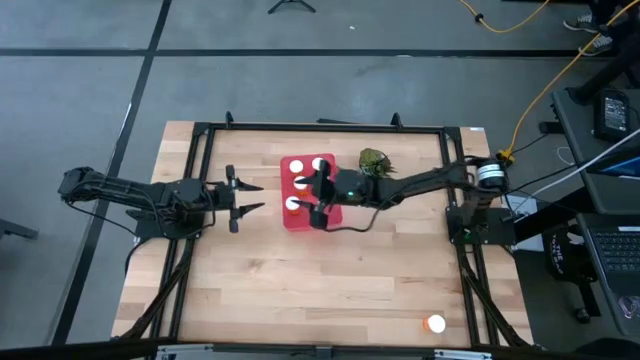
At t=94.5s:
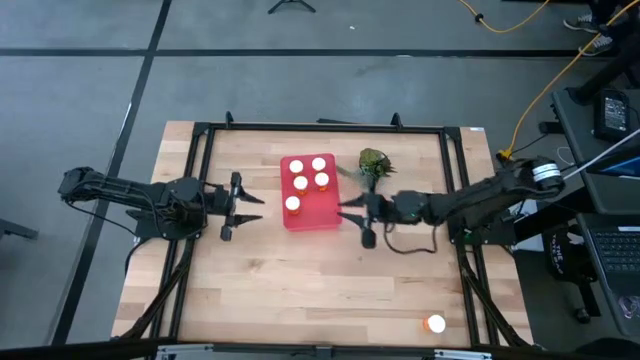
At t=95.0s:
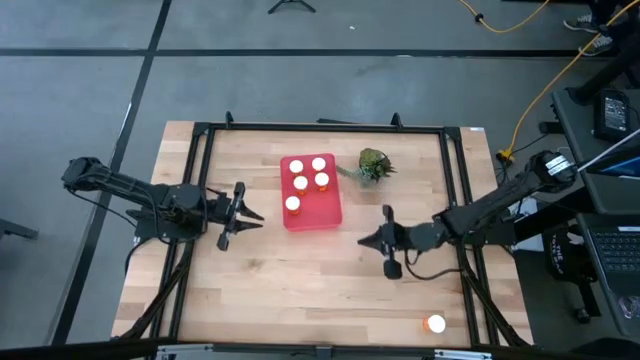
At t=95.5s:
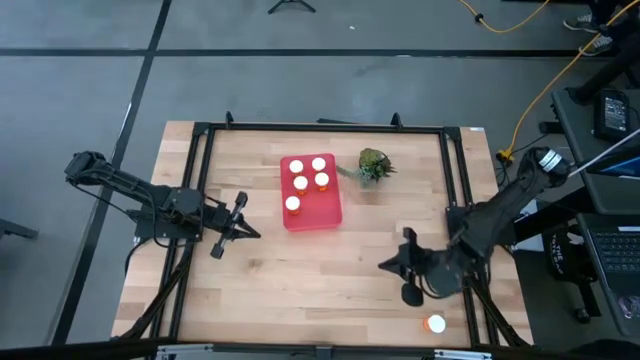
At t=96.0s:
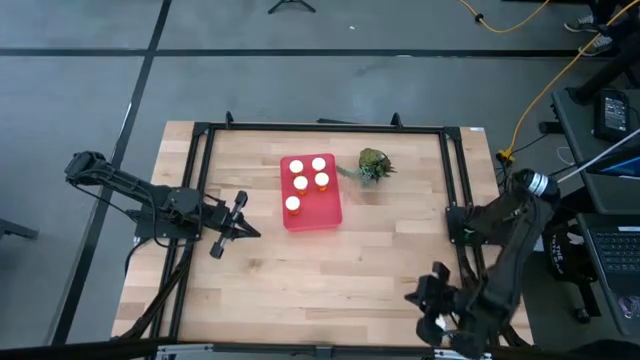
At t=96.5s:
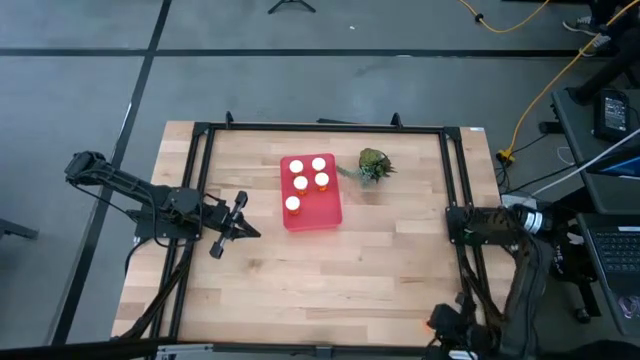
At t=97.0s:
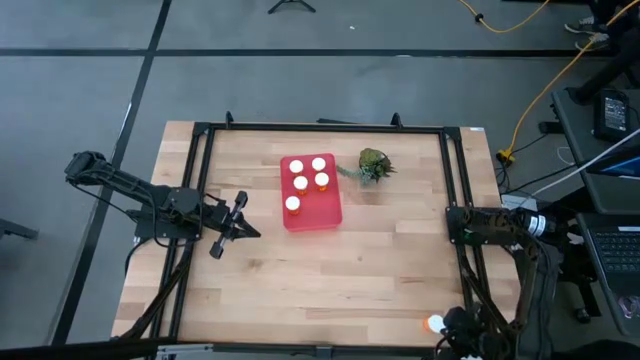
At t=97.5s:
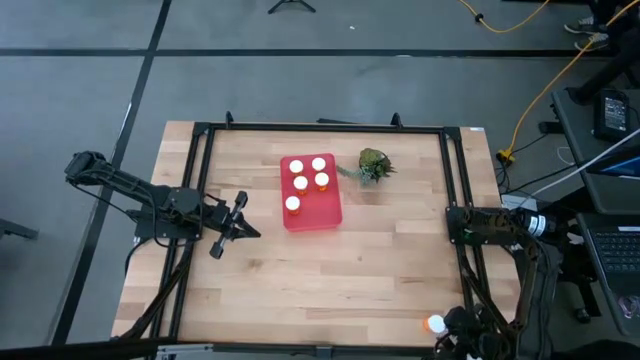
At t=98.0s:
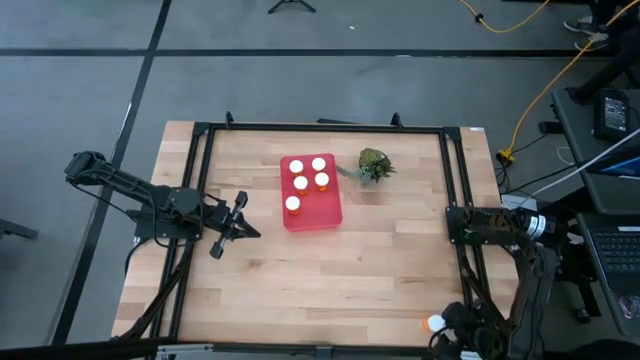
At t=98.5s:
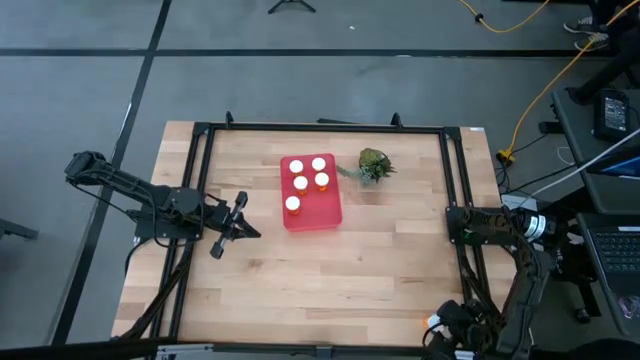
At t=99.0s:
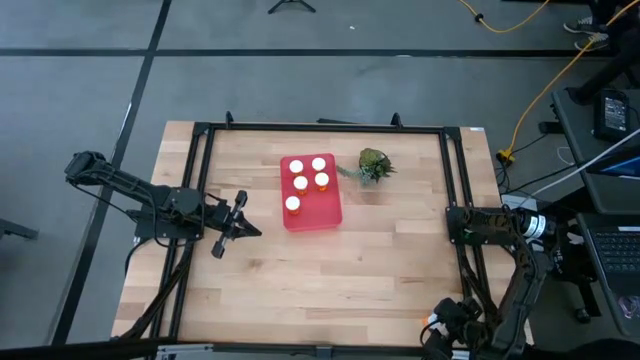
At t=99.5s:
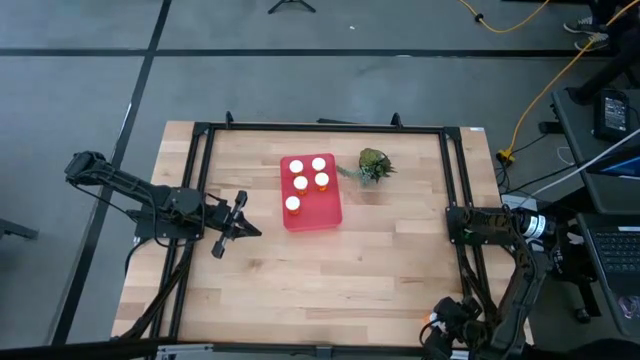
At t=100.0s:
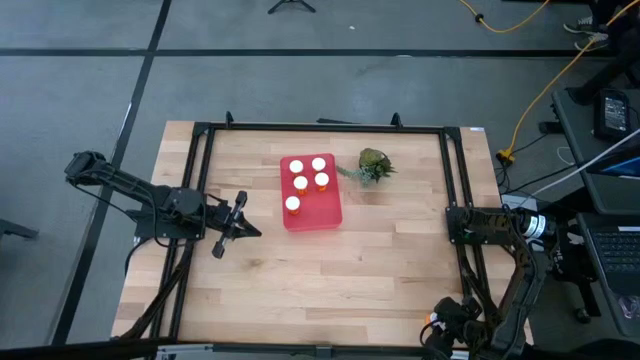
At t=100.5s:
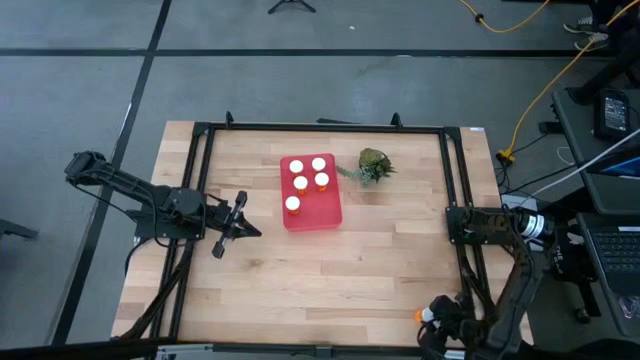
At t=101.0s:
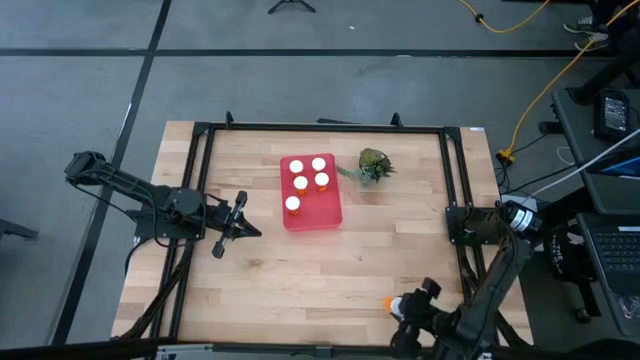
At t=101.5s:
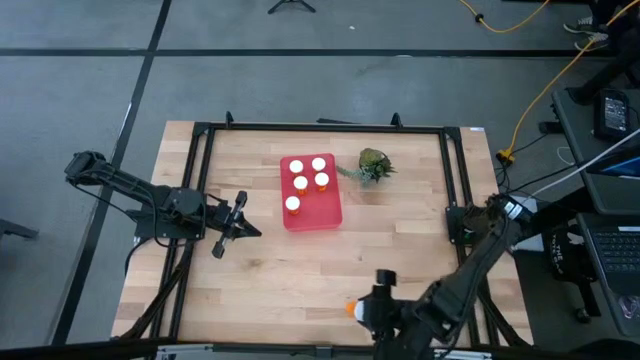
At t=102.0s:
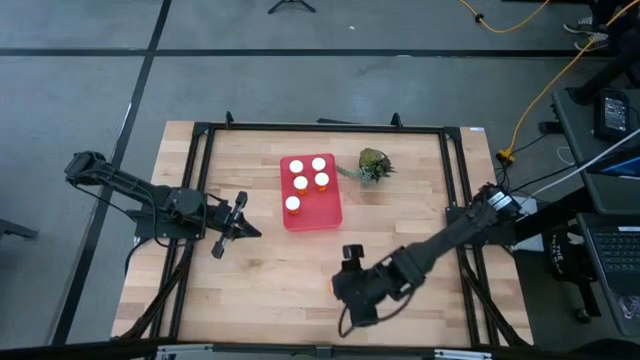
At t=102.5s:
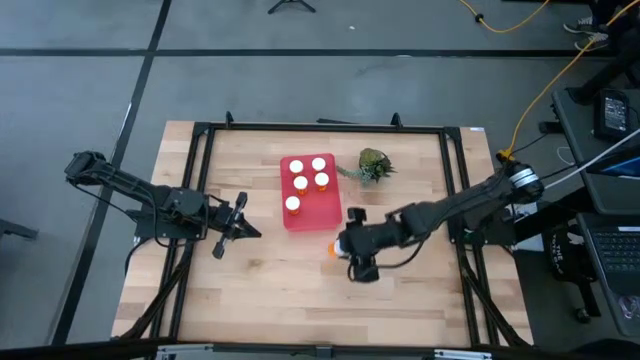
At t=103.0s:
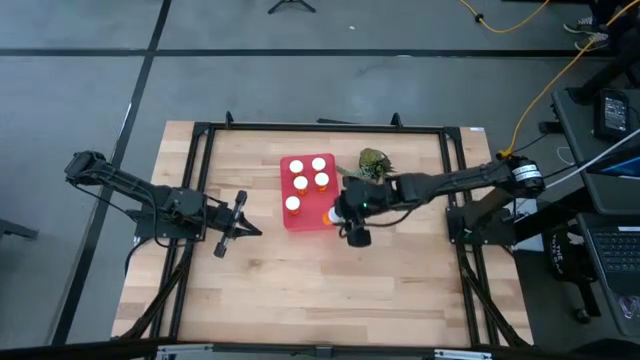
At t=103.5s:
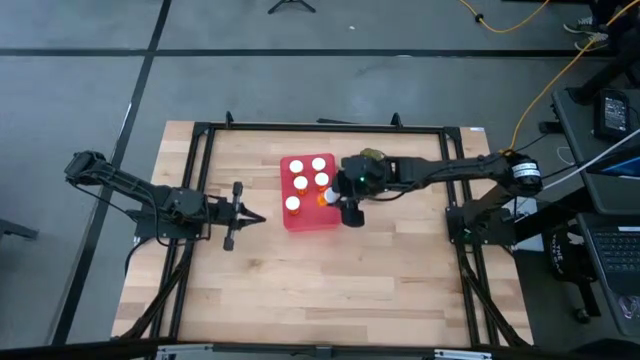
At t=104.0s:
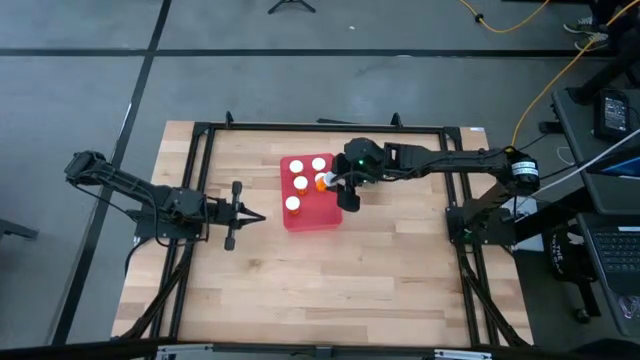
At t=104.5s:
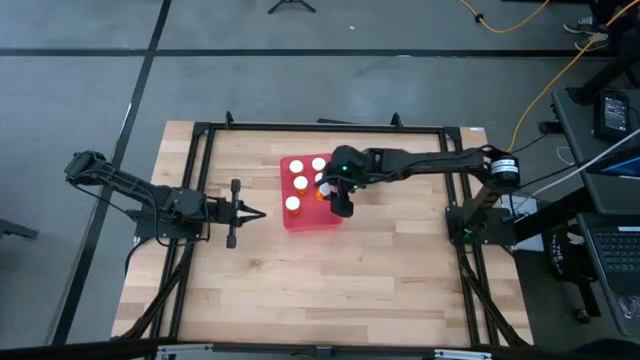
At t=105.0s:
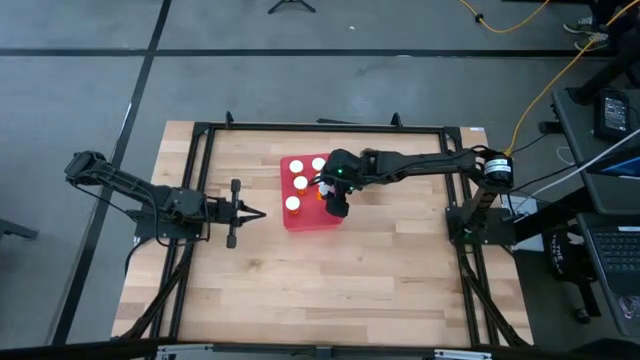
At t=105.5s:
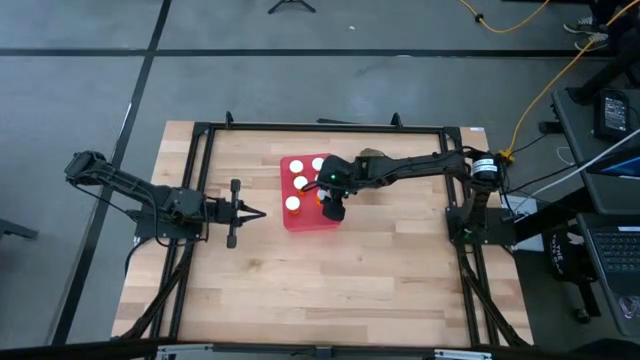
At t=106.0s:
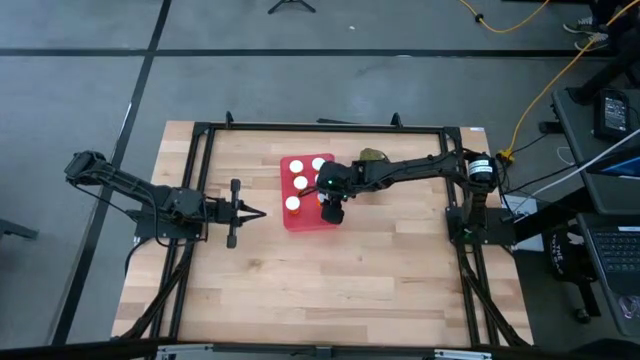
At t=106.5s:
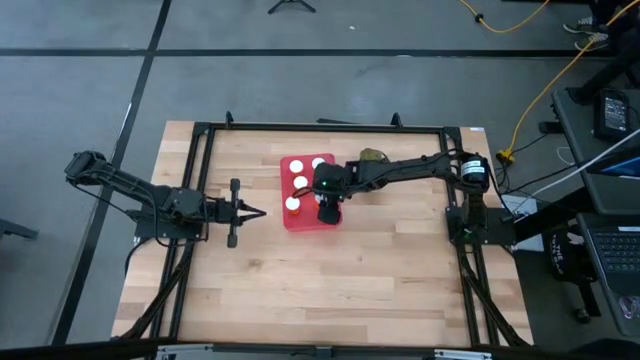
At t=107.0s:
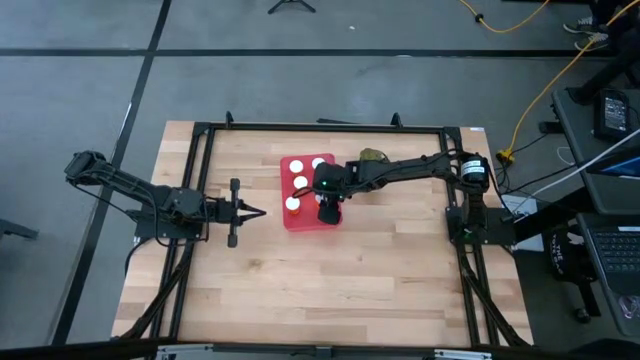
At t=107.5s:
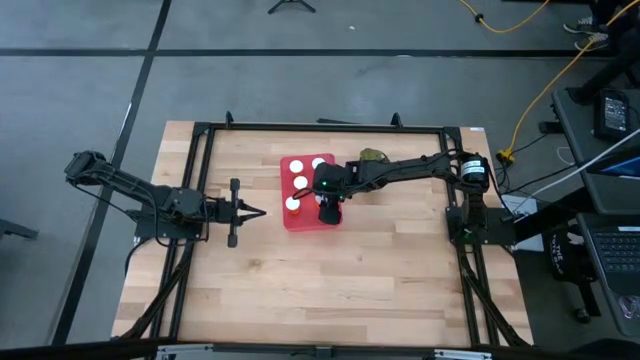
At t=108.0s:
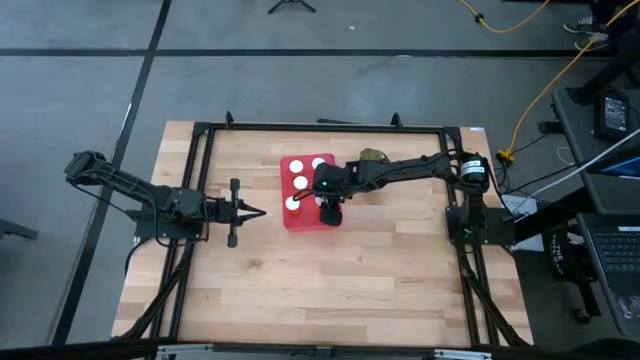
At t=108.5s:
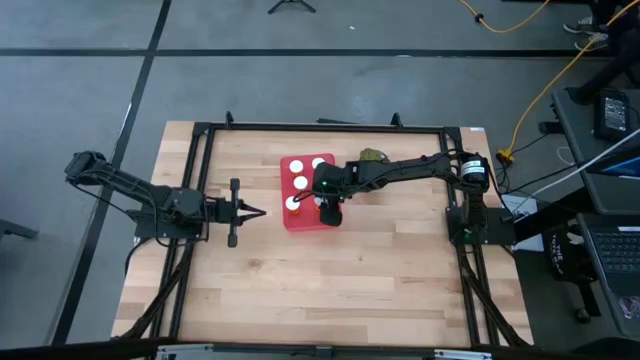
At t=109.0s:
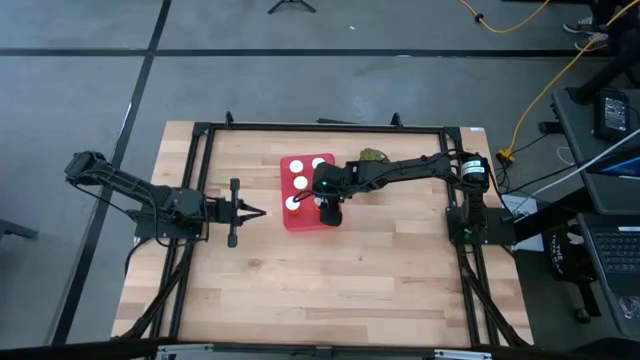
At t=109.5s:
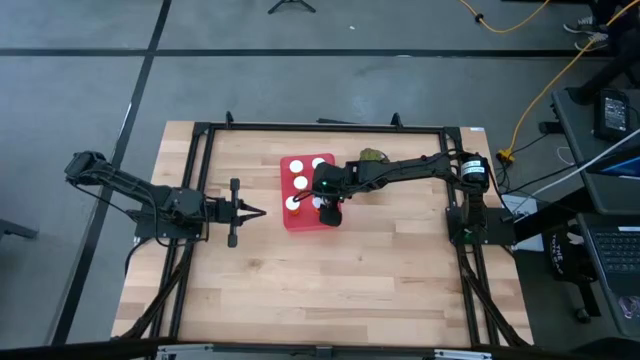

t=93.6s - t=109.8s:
Task: Pick and place pill bottles into a basket
Put the orange pill bottle into the red bin

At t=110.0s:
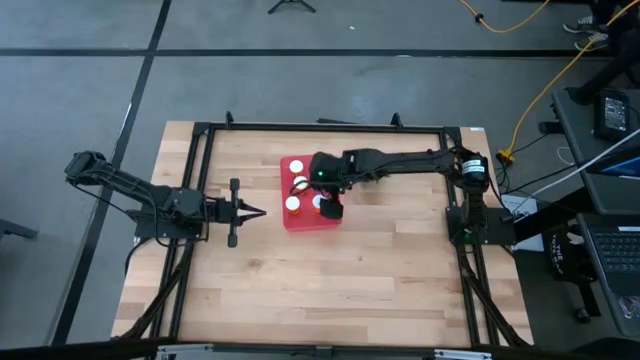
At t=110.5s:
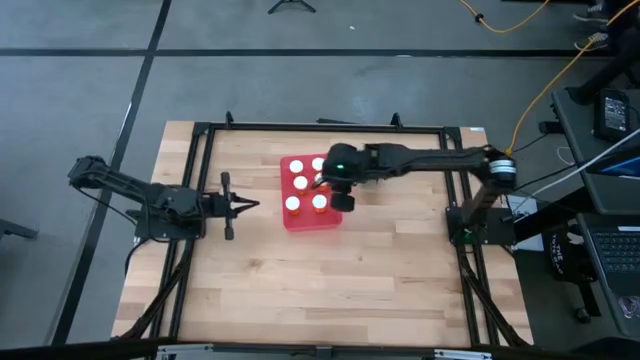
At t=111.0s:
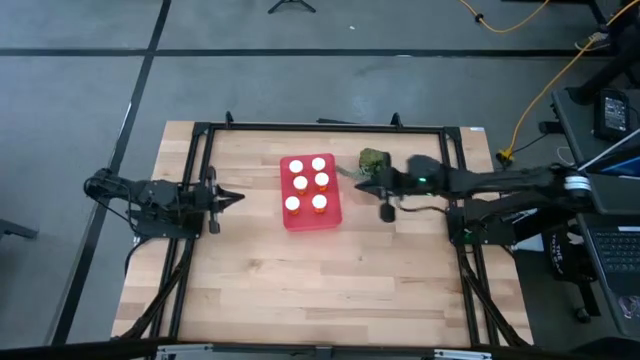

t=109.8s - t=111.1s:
Return to Home Position

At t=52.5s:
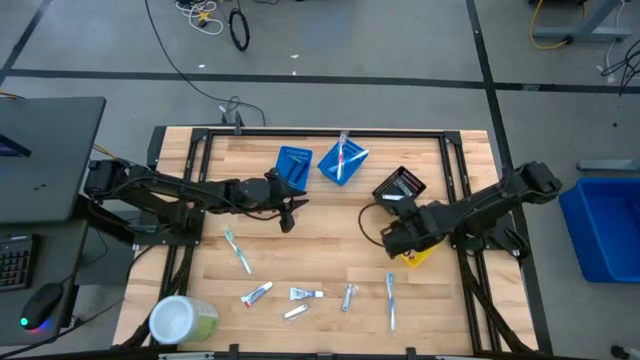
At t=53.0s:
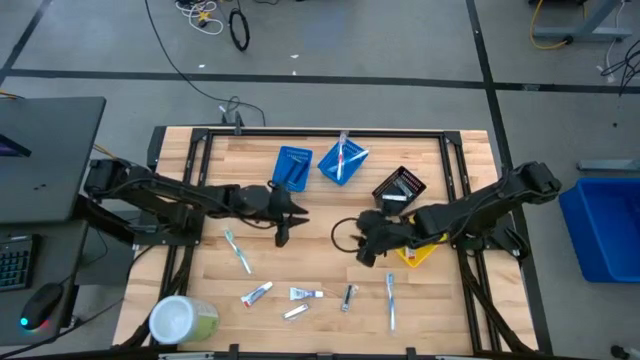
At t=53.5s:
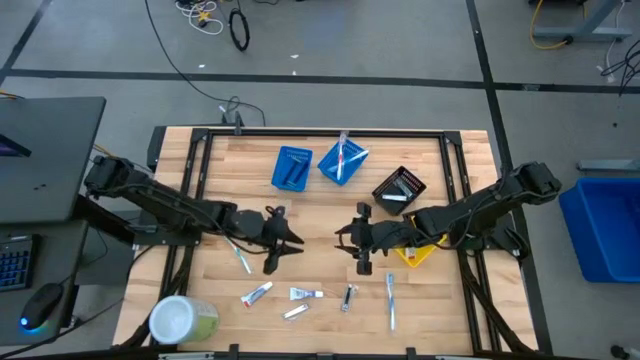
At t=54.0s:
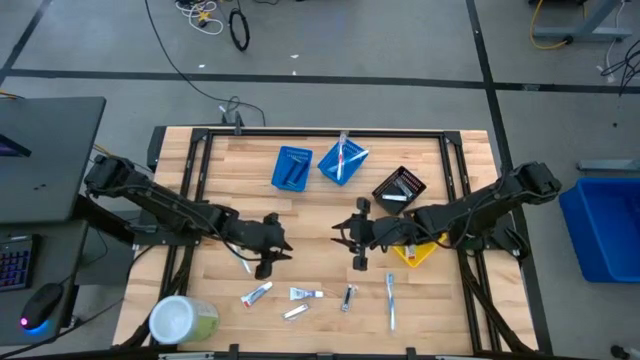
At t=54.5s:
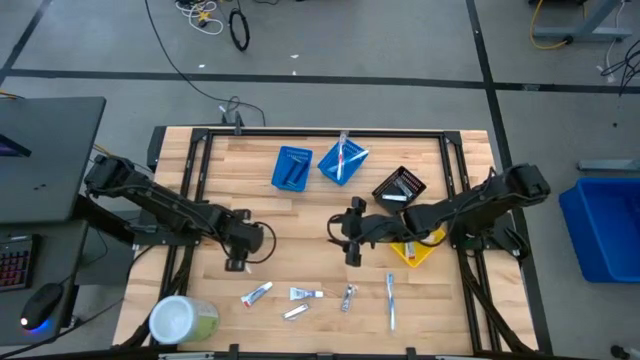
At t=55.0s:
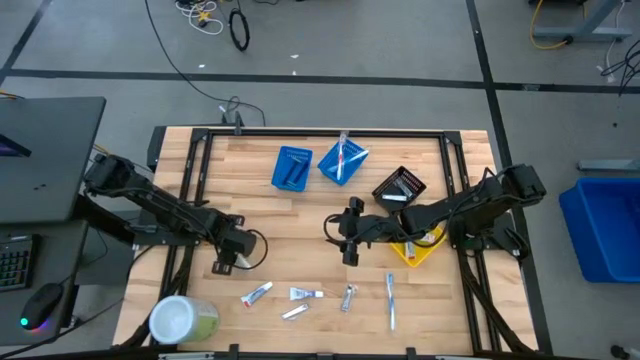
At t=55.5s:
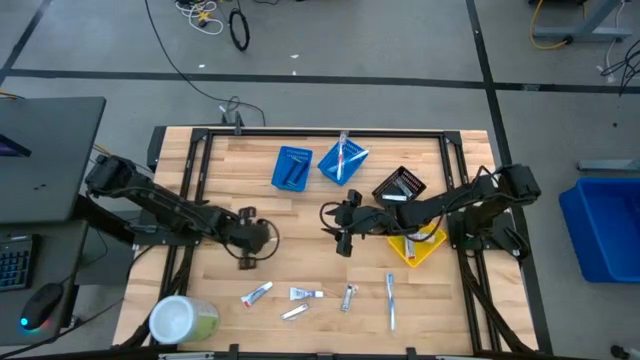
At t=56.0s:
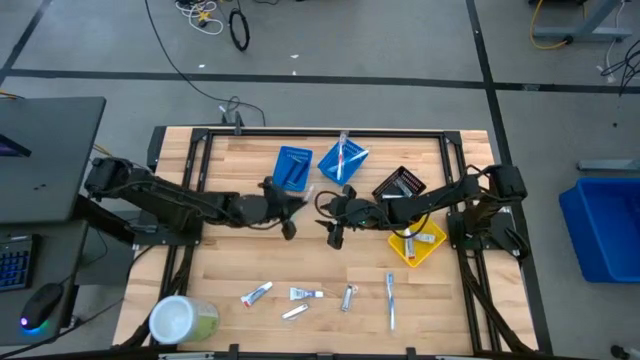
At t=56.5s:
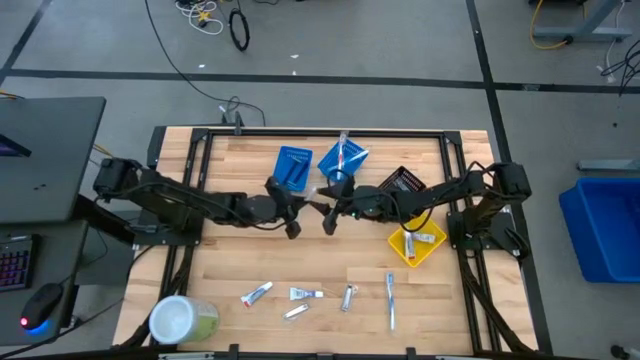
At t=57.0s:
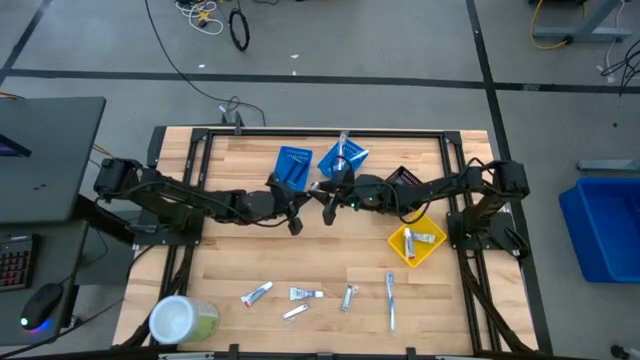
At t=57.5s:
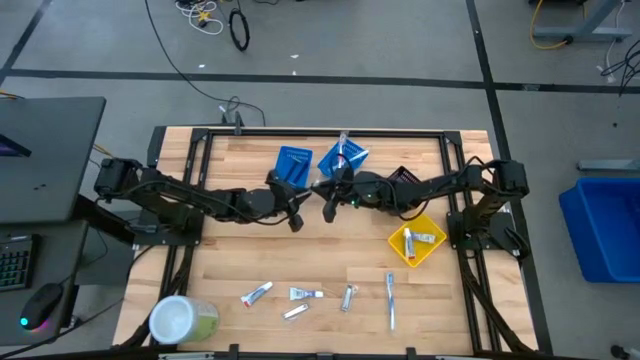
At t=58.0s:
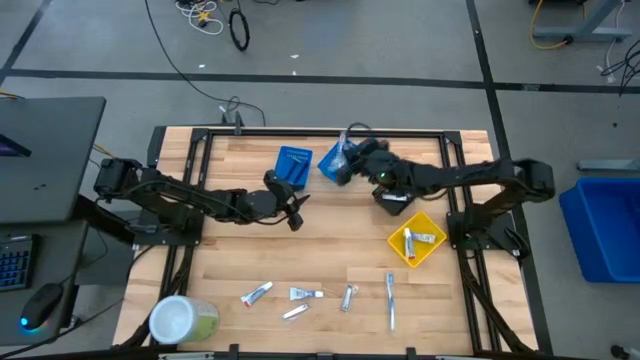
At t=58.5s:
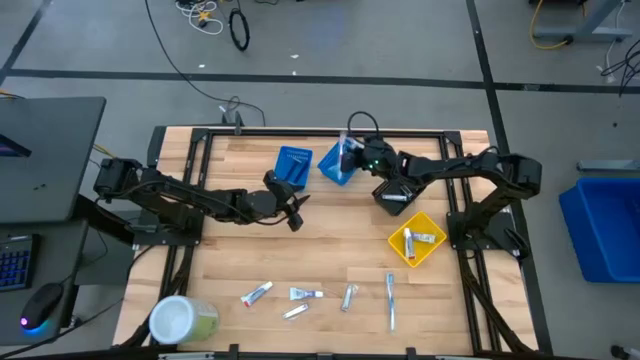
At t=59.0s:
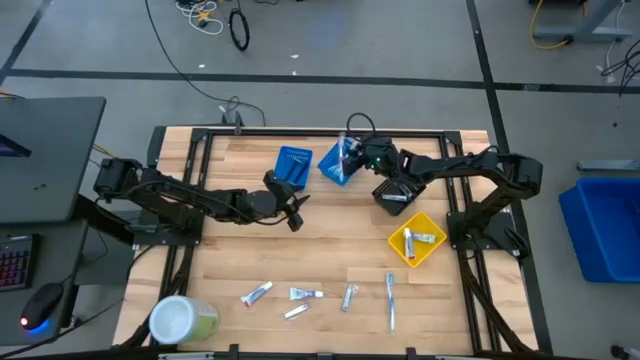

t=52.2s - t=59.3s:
Task: Pick & Place Travel size toiletries
Put the green toothbrush into the right blue basket
